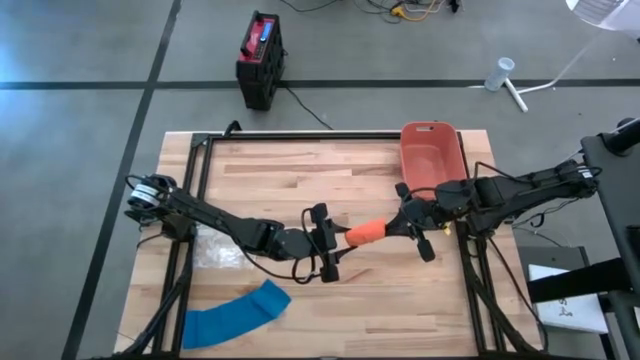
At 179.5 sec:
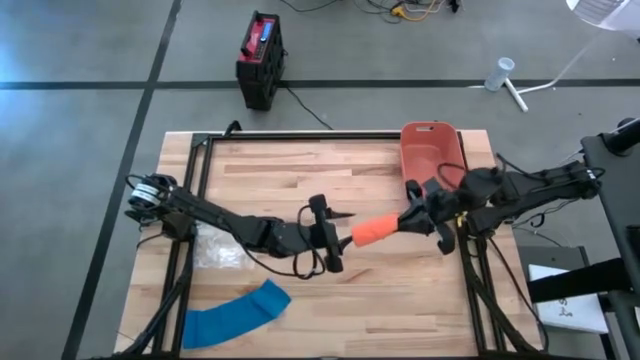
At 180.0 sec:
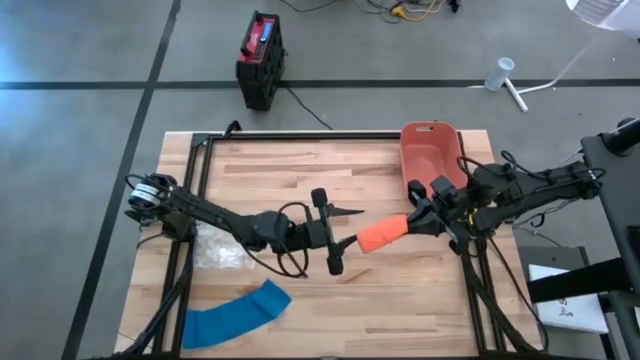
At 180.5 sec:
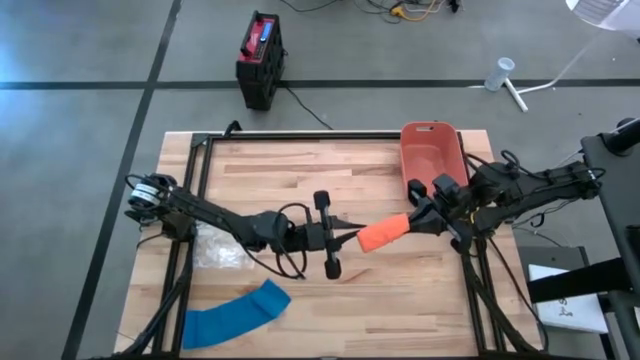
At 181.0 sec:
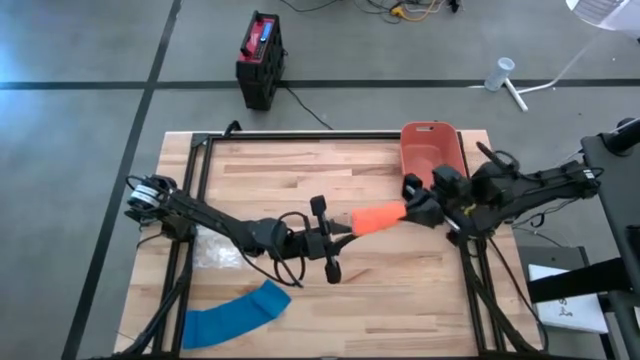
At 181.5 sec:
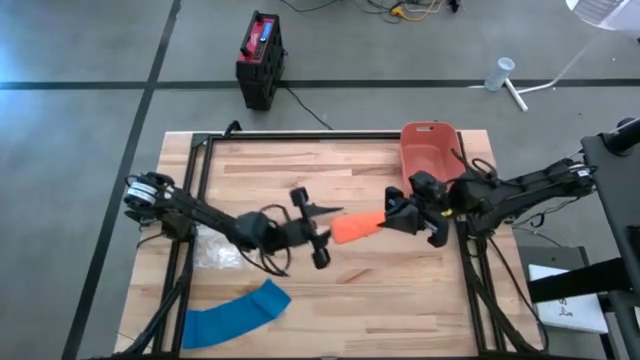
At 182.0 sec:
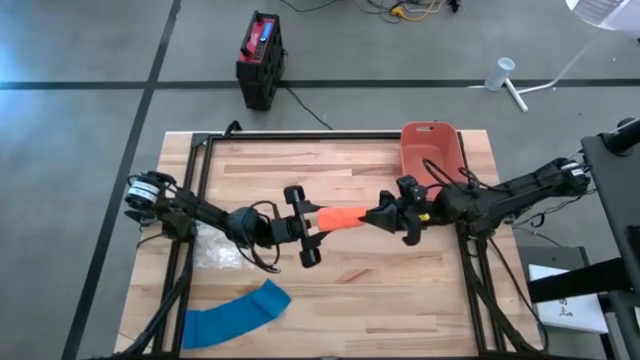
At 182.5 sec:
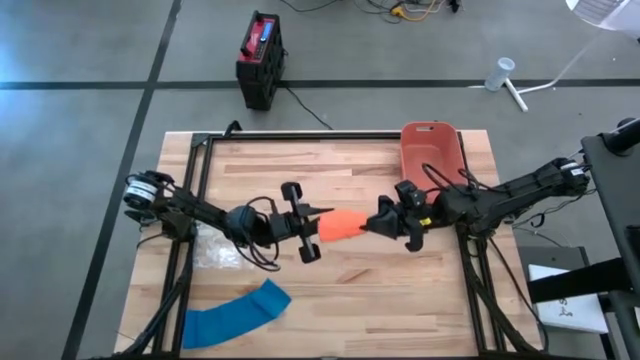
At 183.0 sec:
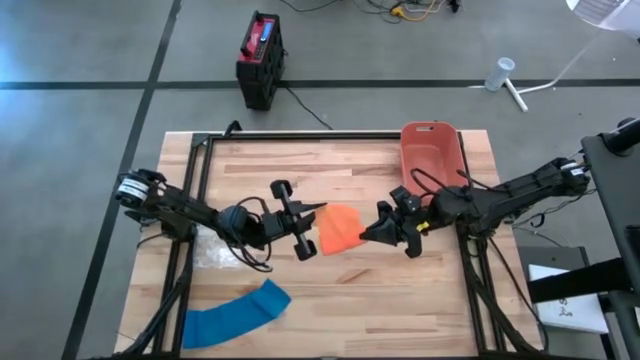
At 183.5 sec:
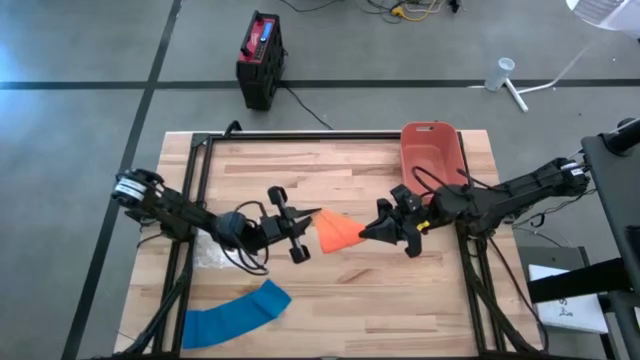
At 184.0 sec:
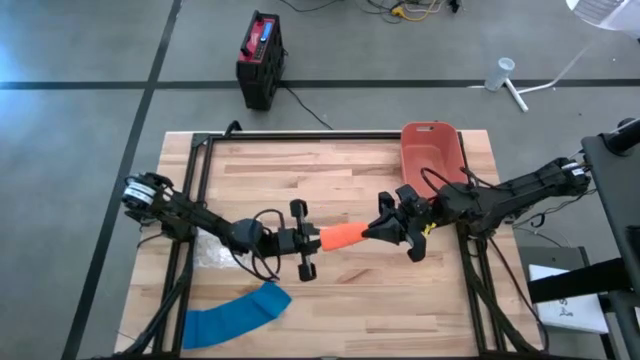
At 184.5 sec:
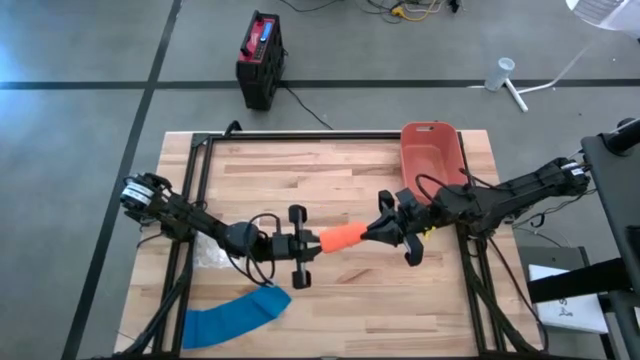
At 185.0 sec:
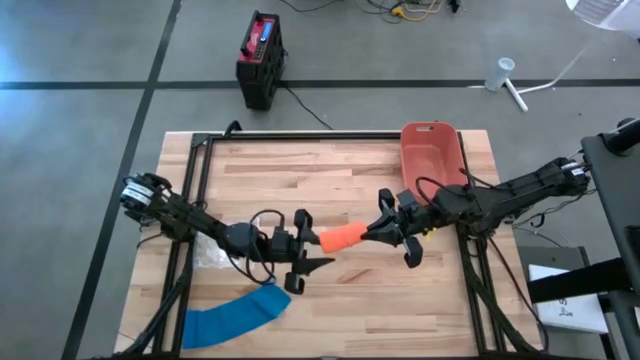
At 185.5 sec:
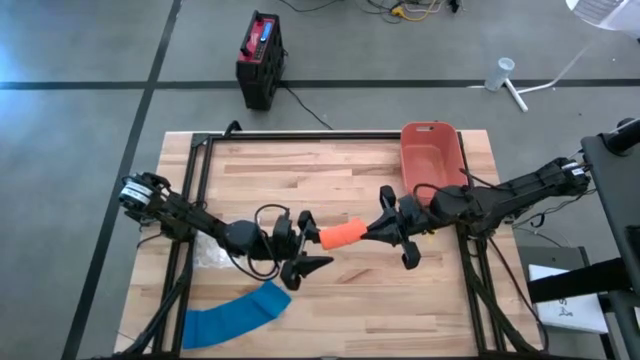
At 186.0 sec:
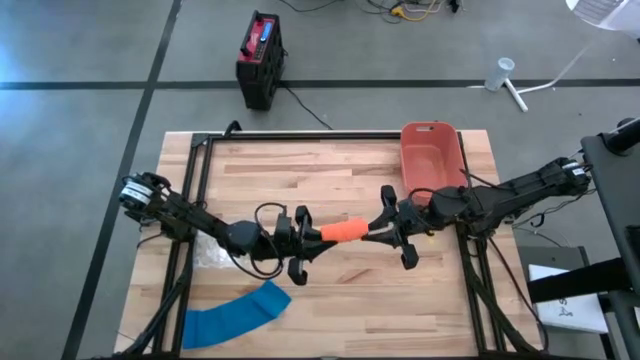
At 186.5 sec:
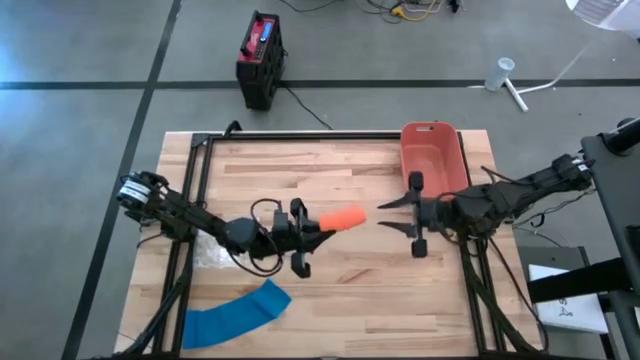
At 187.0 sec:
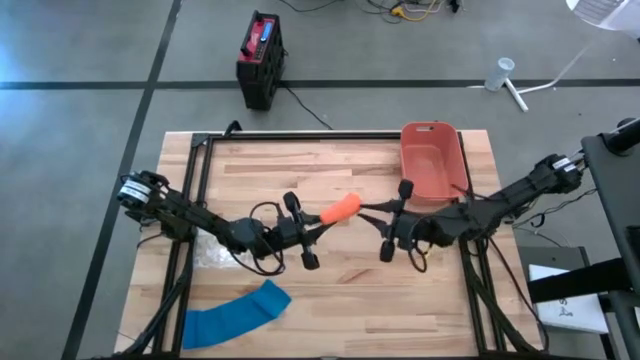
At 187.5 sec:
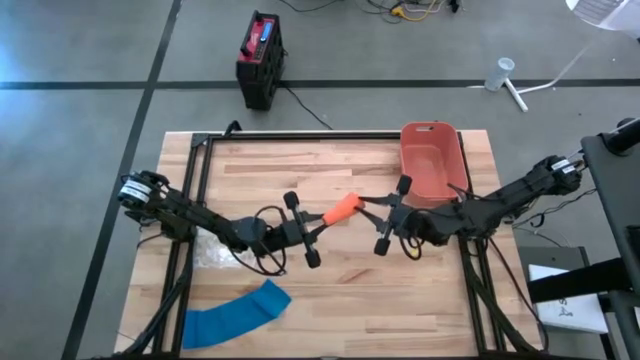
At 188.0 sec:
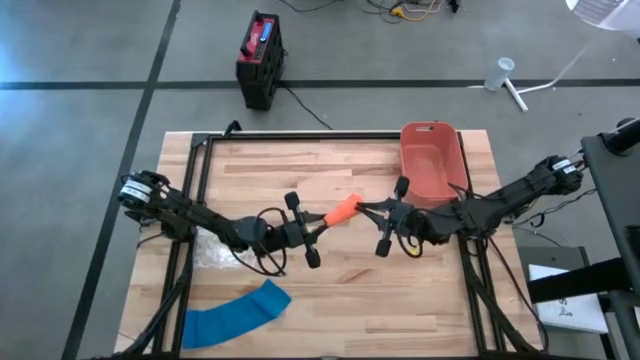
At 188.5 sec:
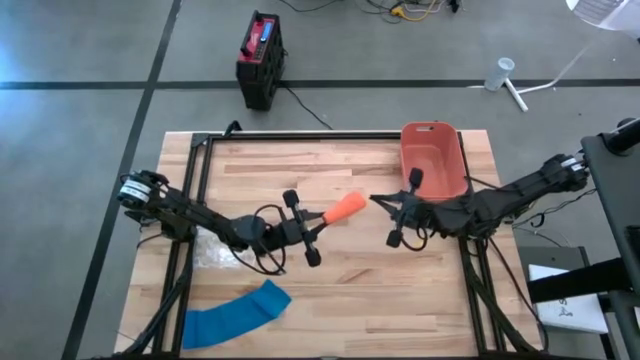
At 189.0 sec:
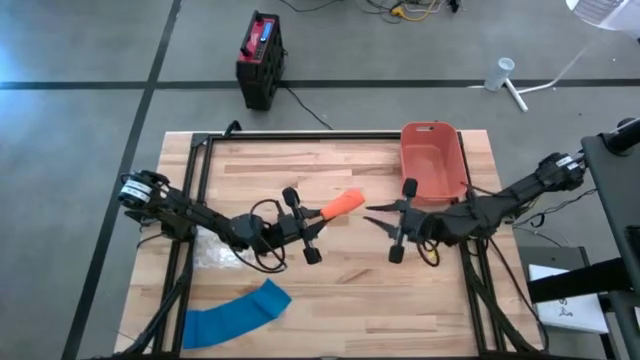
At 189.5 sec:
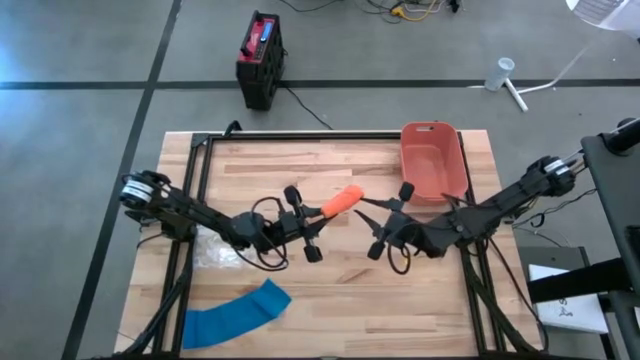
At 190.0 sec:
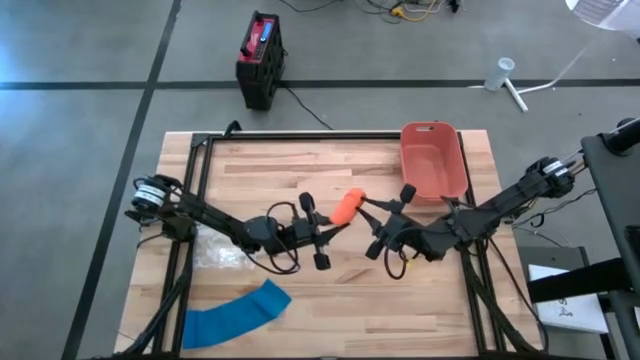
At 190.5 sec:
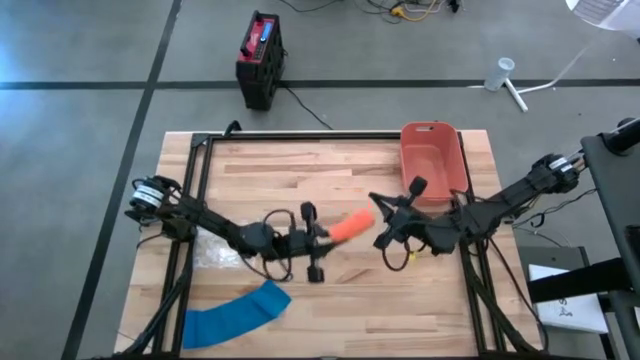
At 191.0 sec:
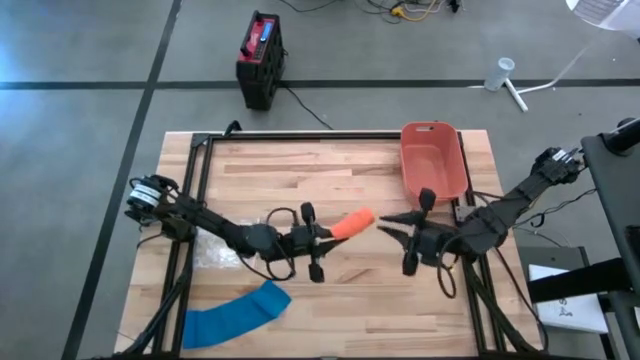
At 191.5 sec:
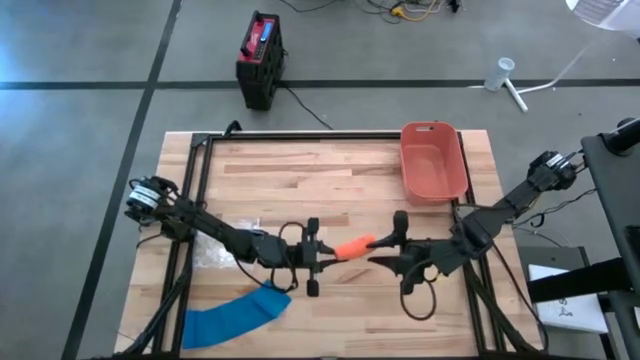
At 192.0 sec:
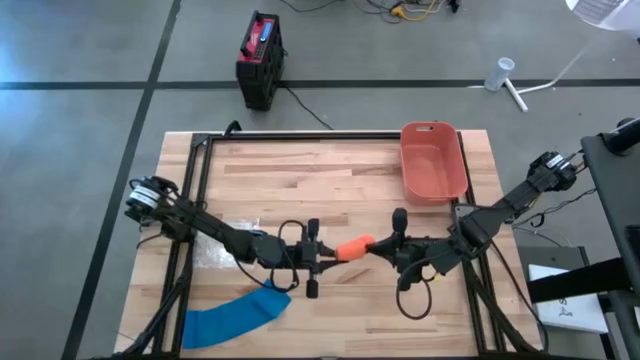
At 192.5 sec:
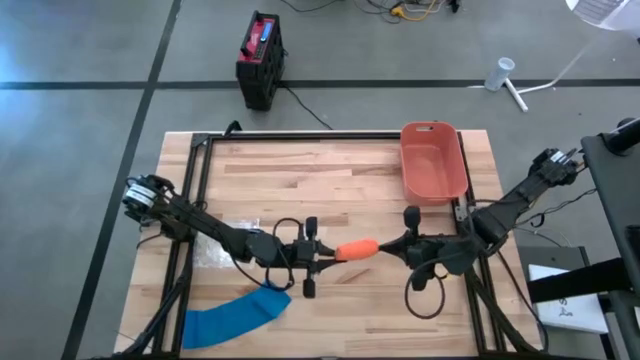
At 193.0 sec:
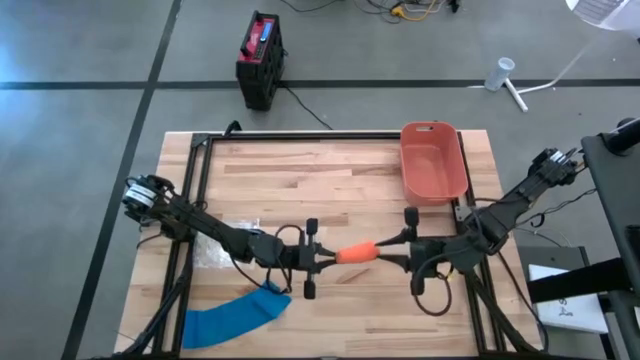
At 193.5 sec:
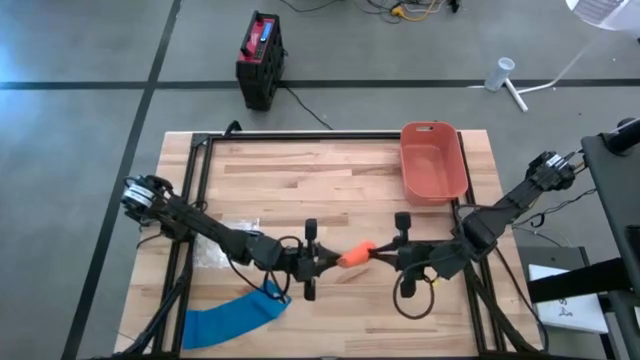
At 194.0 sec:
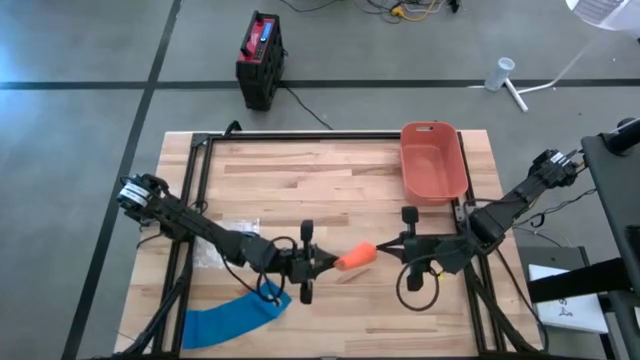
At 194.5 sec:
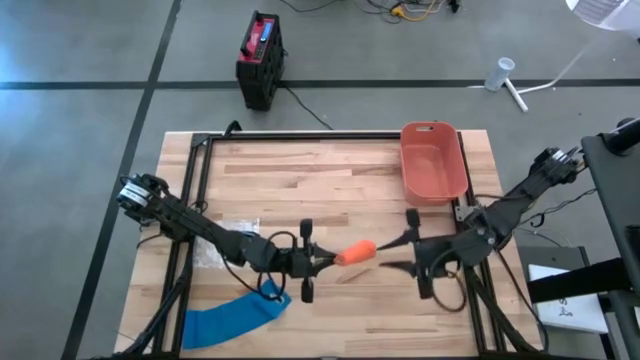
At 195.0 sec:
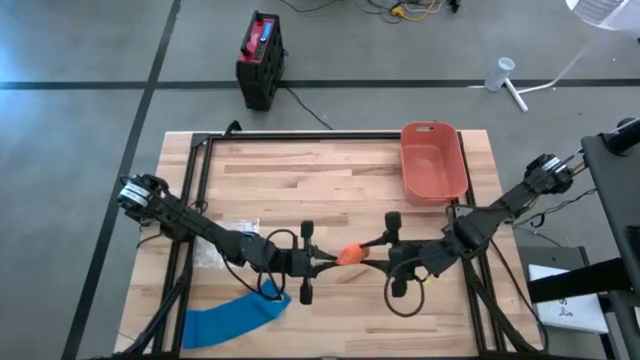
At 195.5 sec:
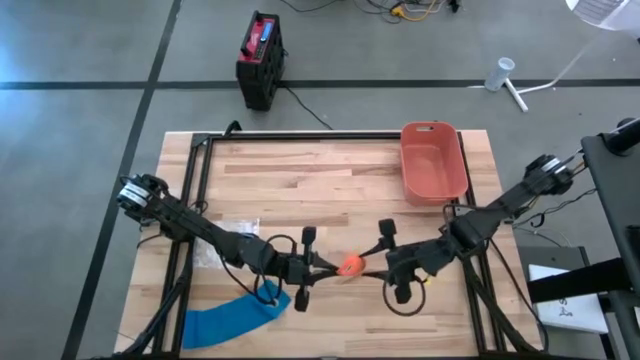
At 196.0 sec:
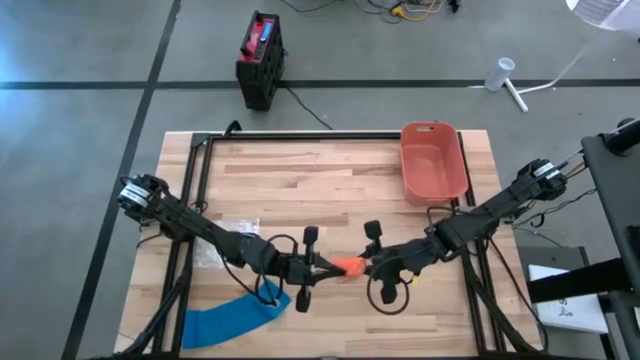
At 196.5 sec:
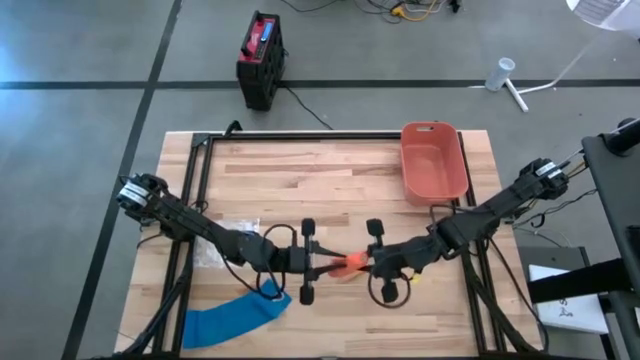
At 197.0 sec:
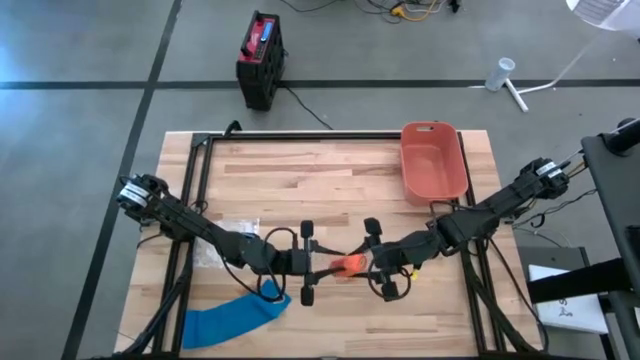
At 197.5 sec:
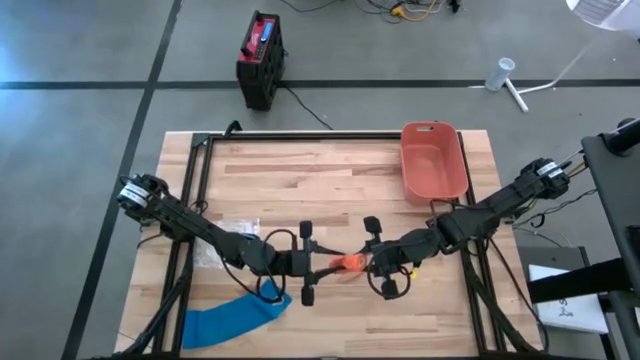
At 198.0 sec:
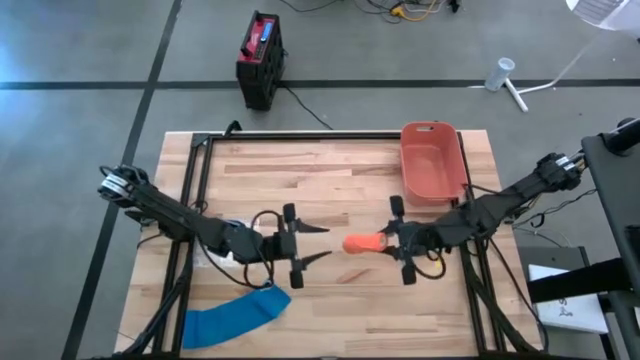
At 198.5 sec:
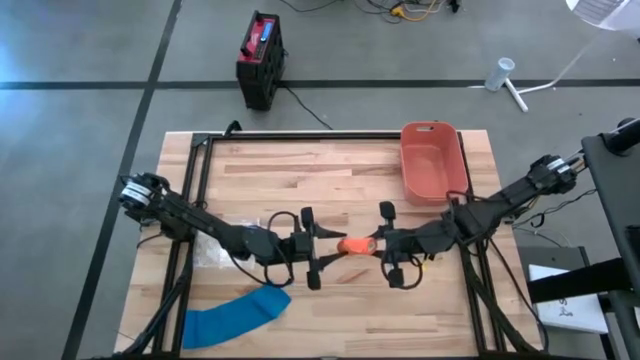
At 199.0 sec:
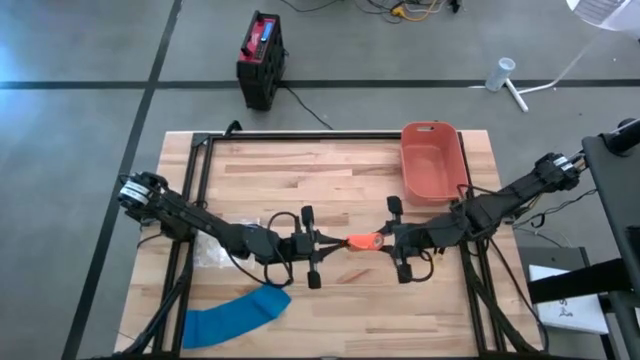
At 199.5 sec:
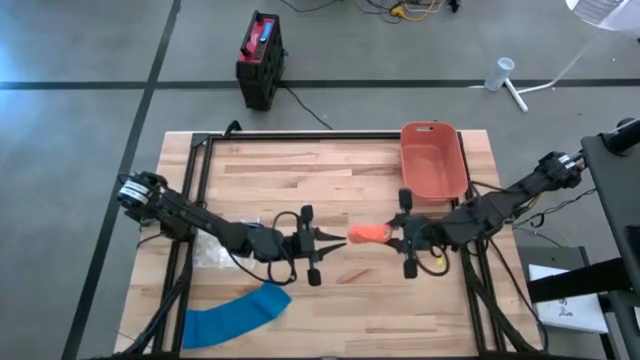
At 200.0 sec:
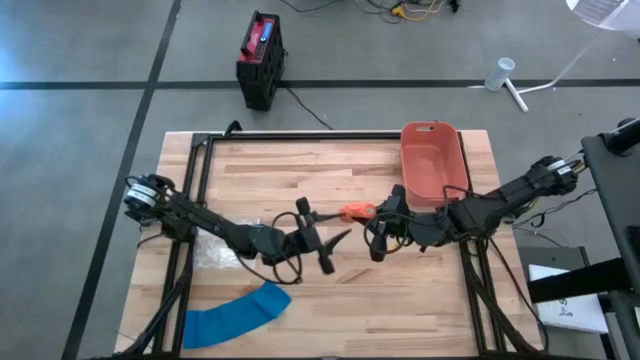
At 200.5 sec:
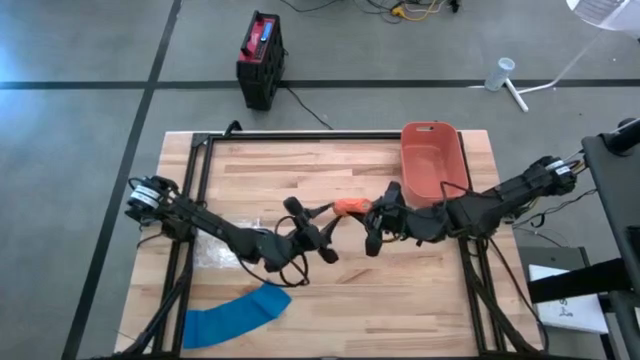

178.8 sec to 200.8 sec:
Task: Roll bandage
Roll the orange bandage
